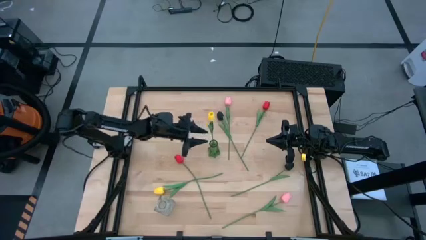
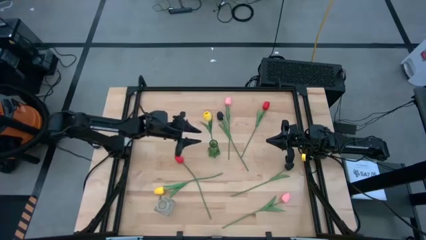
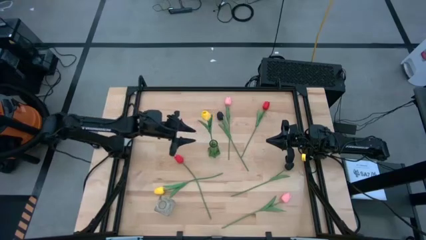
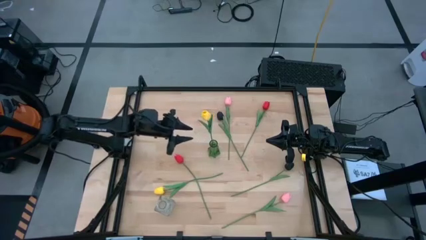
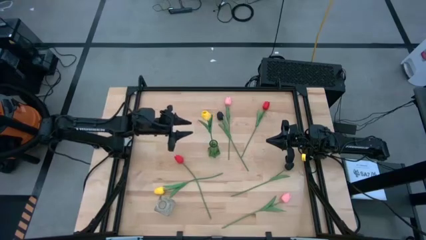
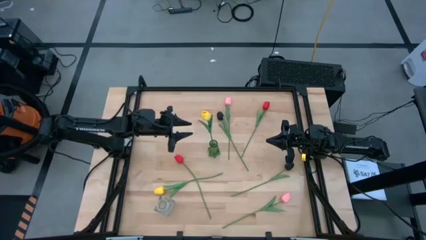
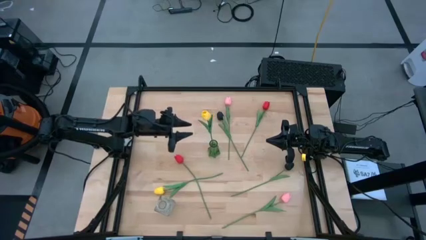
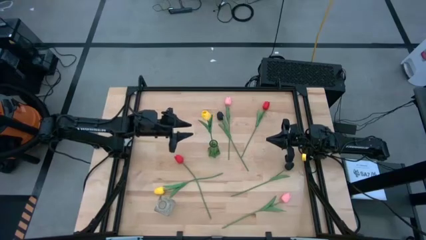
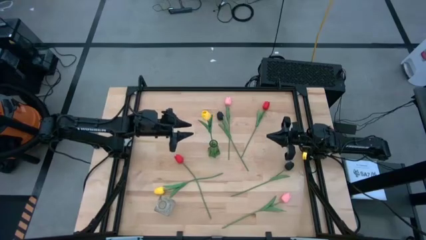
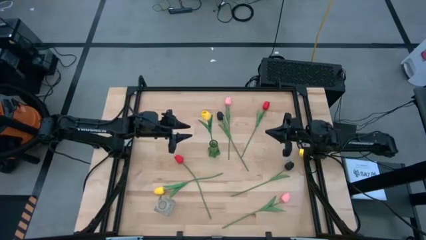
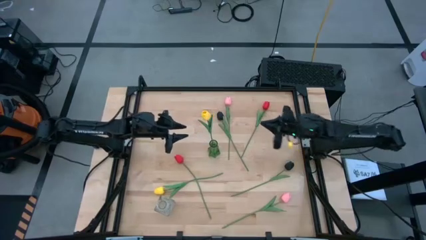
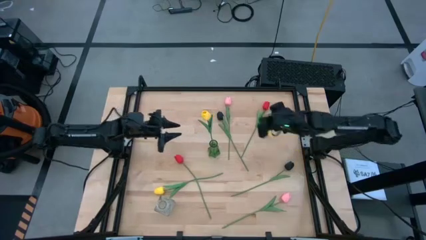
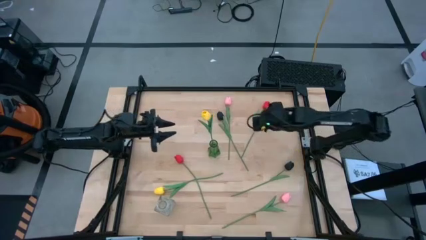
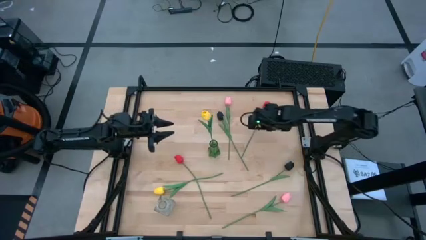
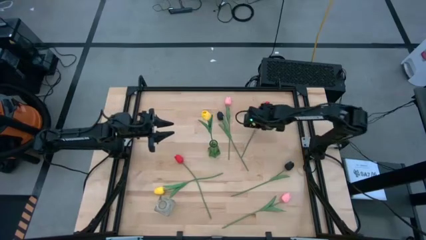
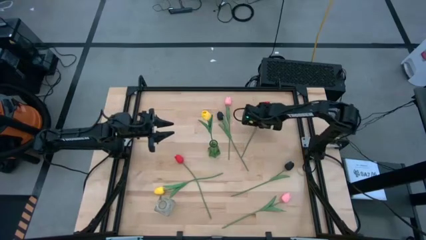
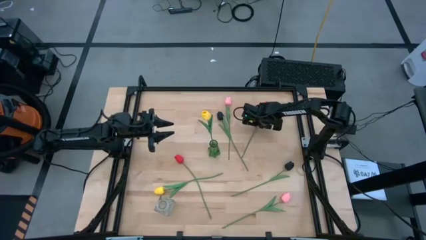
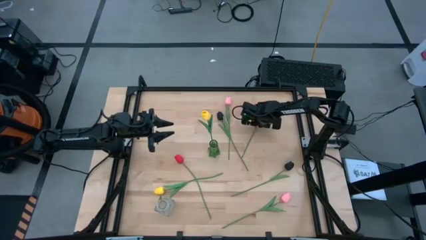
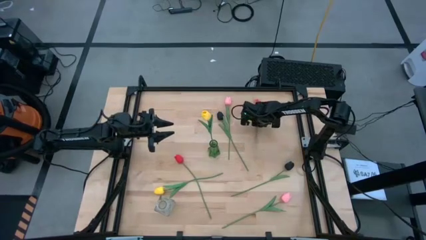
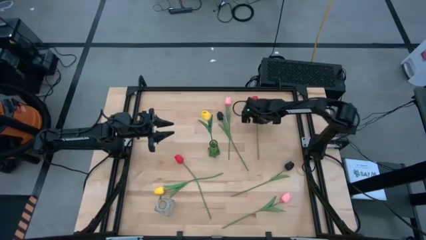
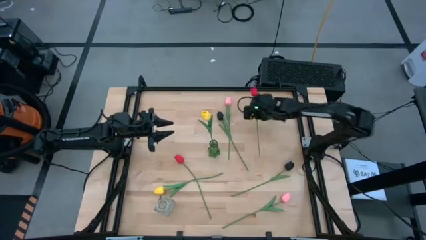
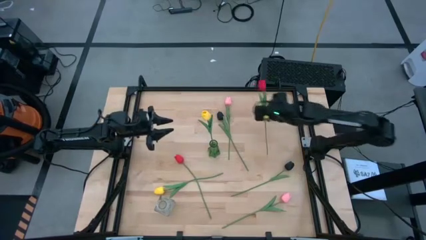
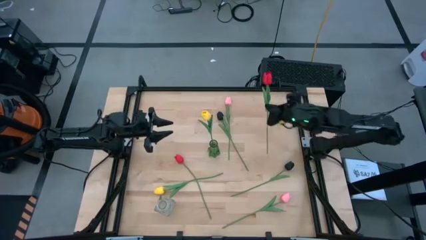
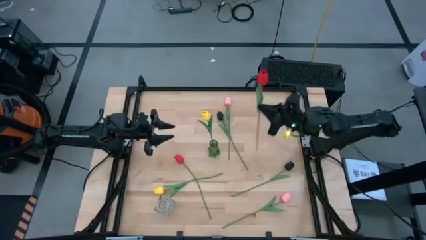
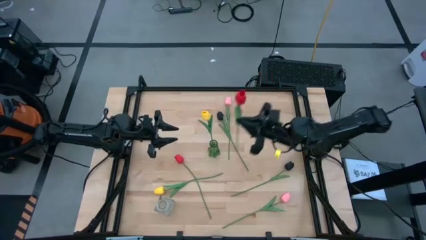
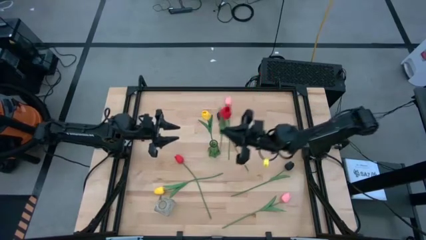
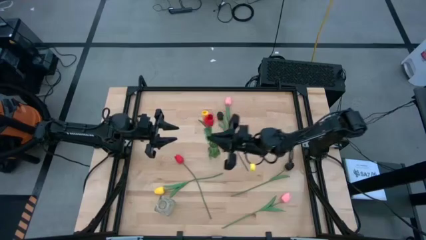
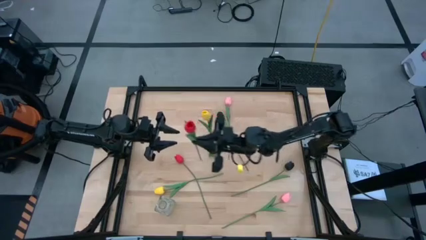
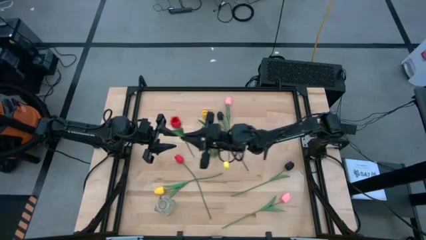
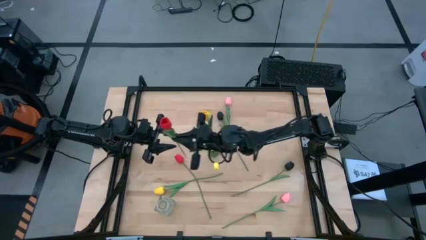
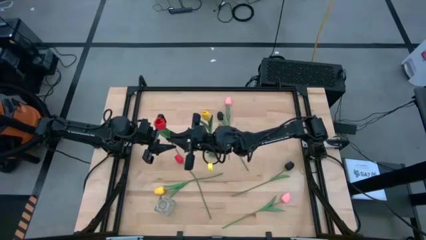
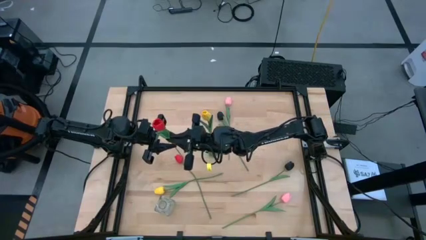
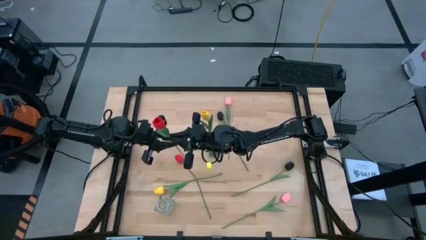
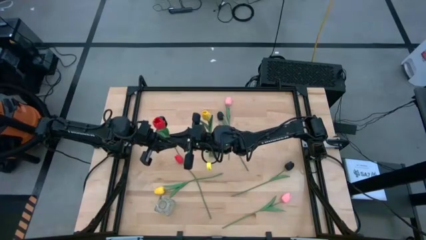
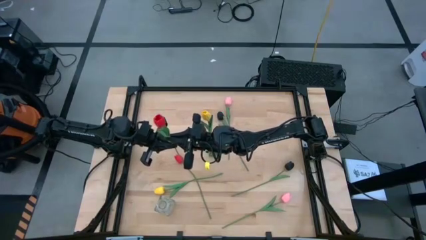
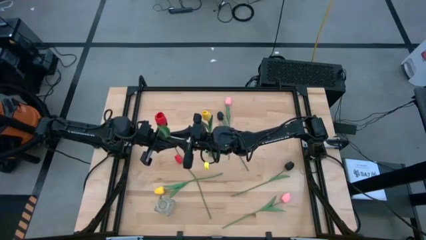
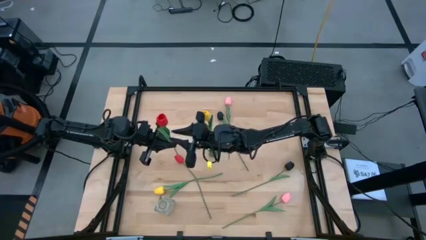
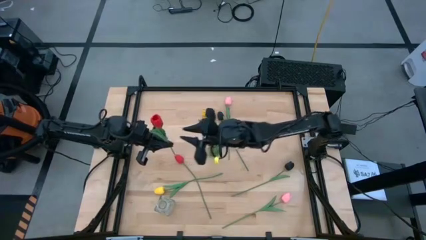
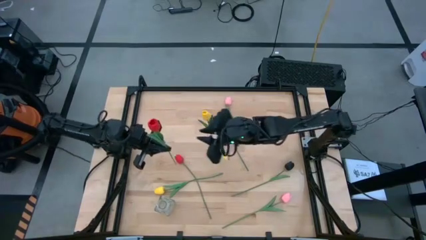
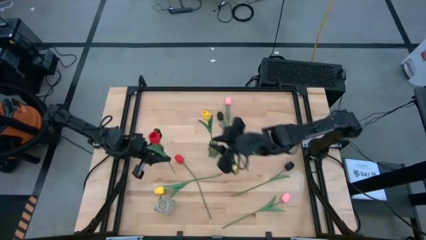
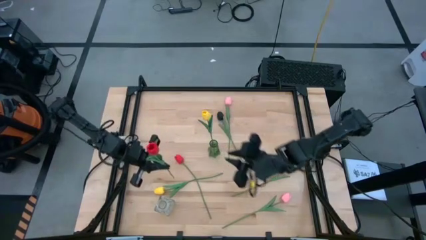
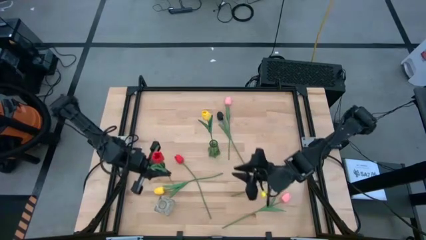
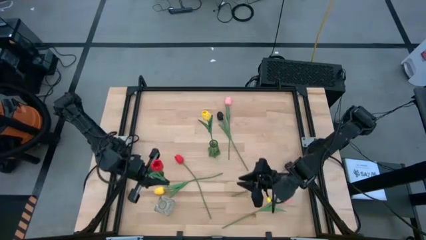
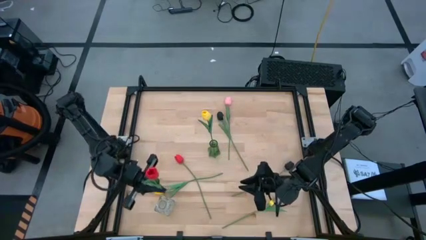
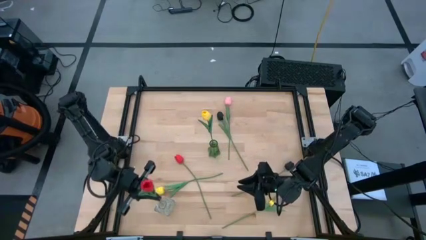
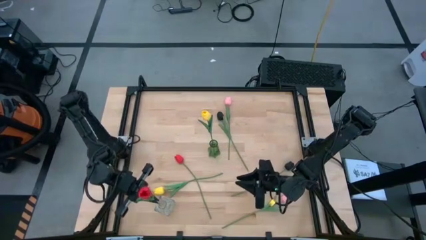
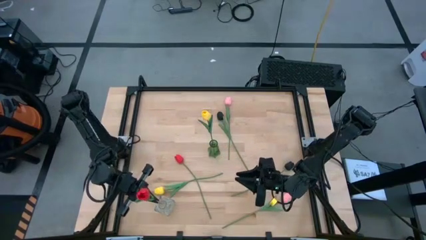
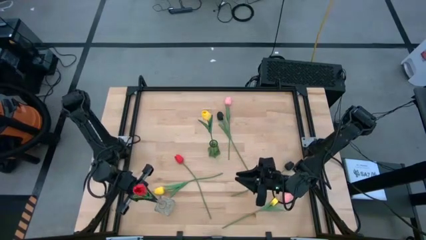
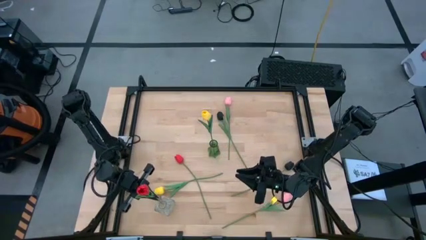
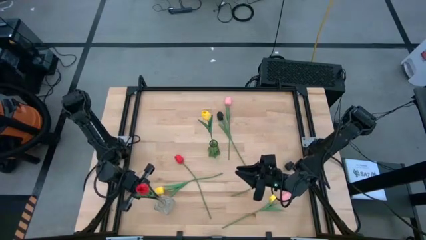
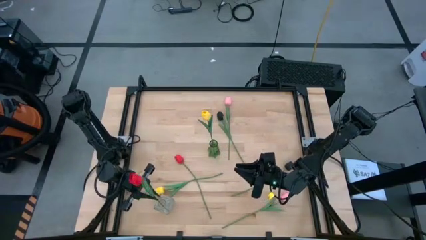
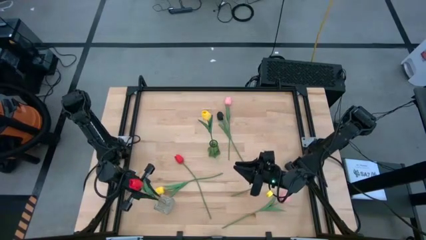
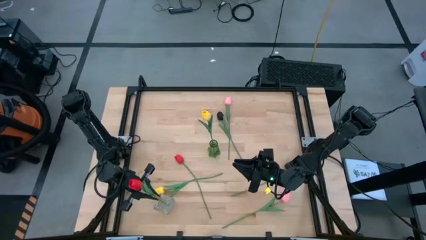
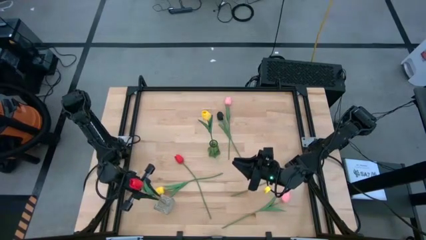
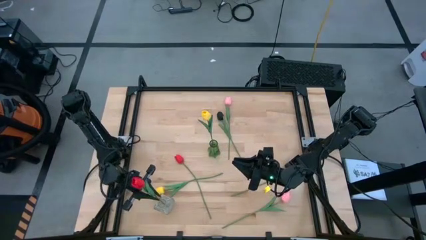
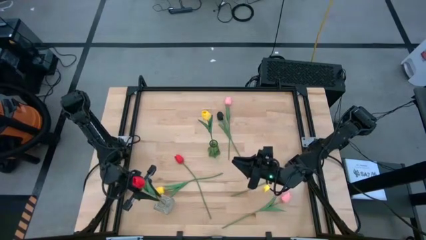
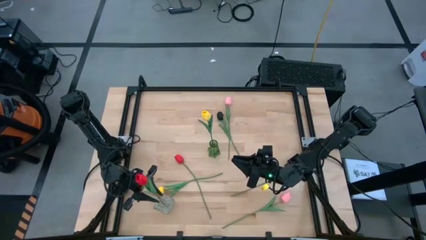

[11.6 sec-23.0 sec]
Task: Sort flowers into vase by color
Put the right red tulip into the transparent vase

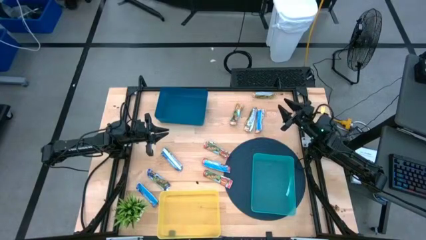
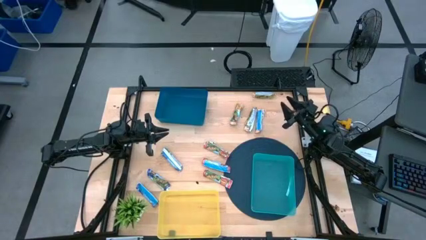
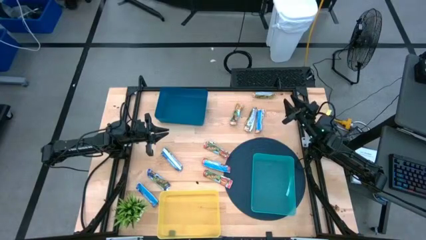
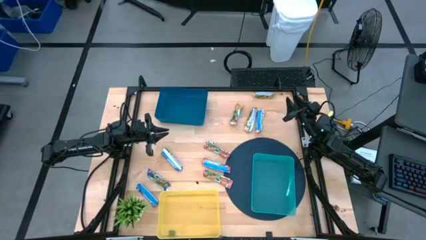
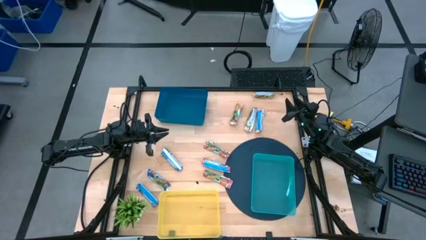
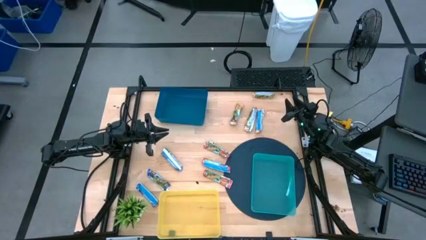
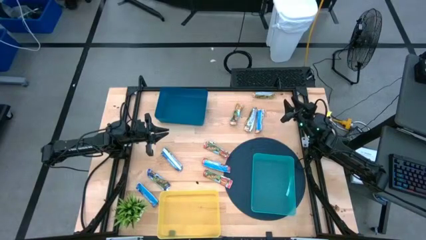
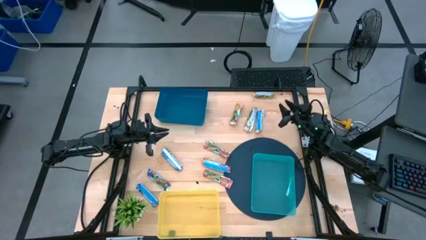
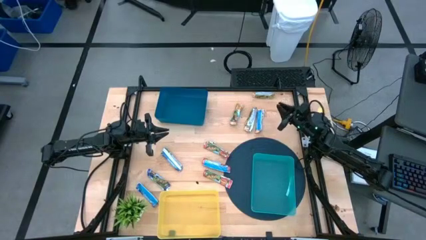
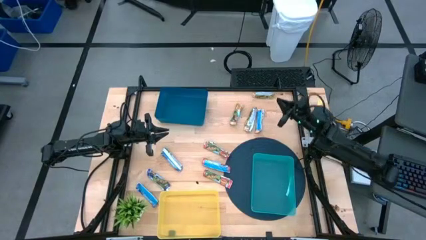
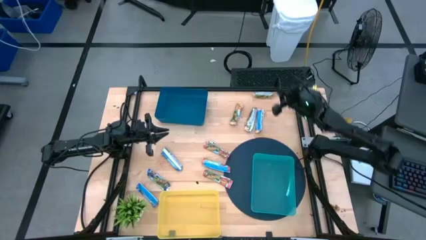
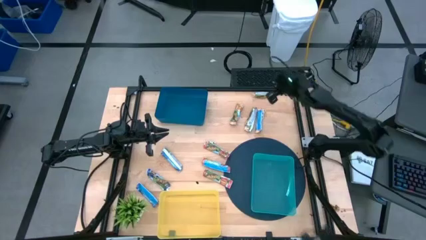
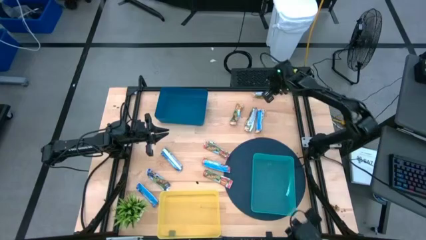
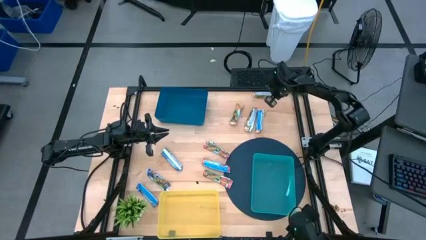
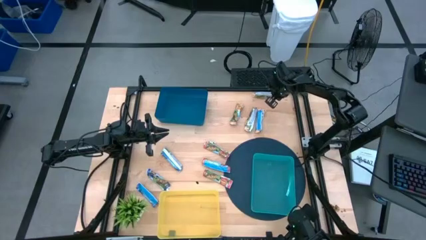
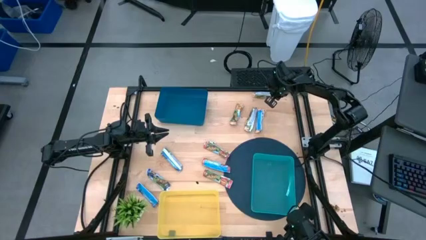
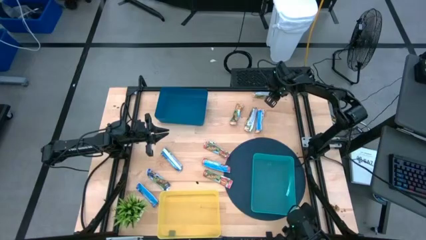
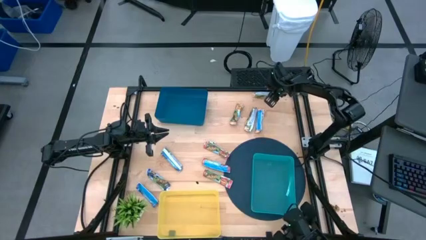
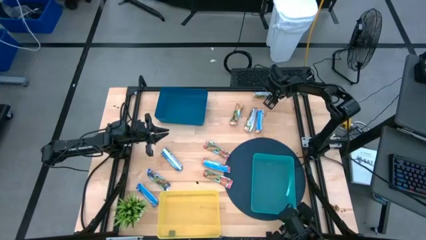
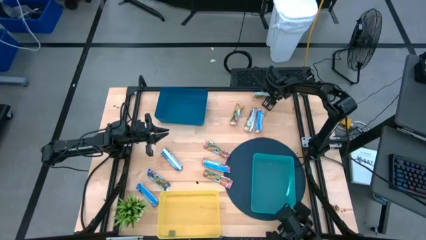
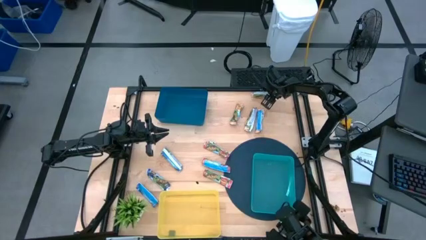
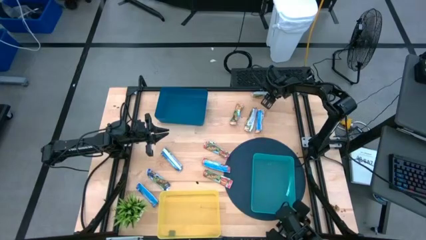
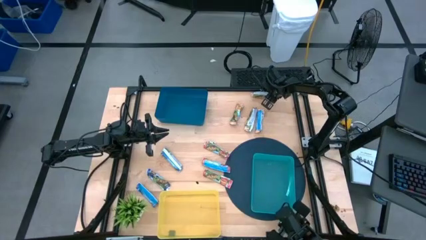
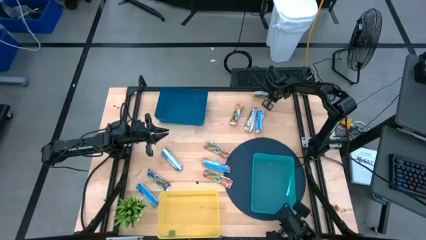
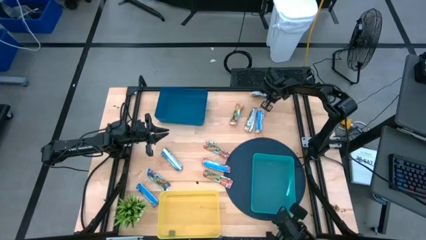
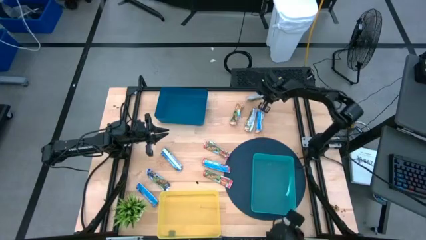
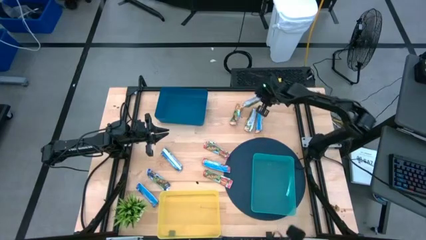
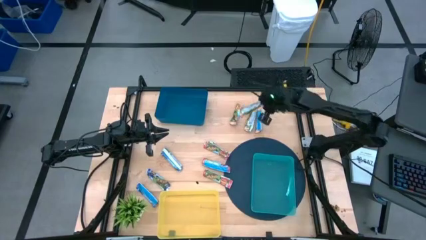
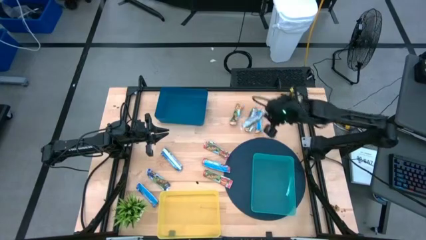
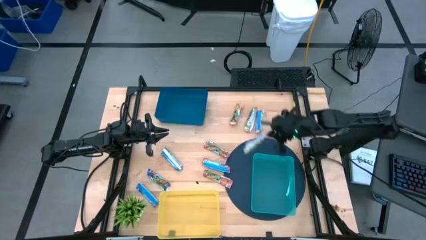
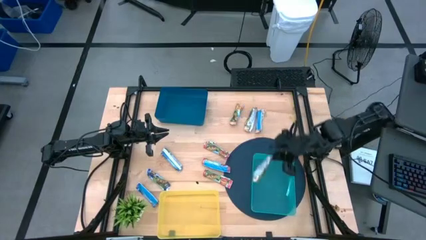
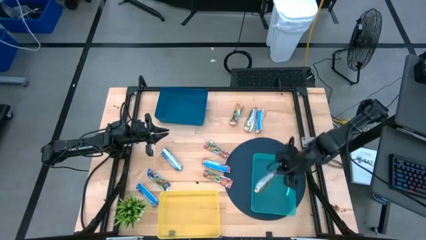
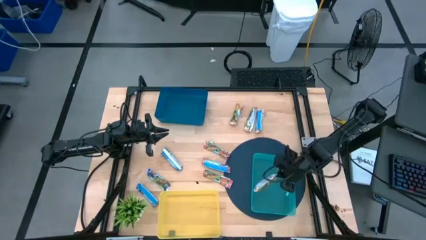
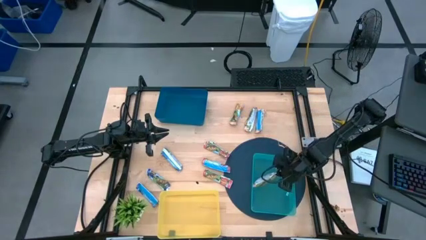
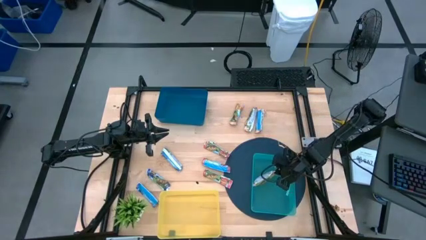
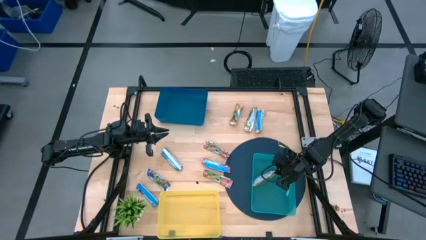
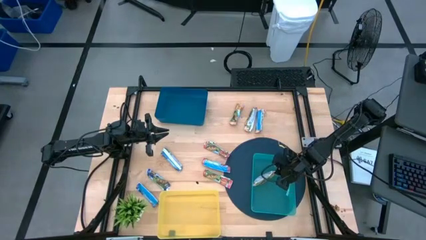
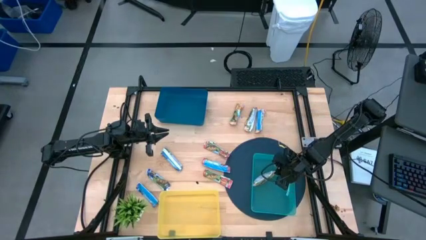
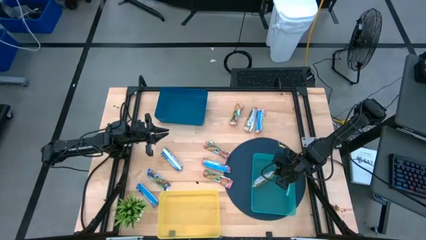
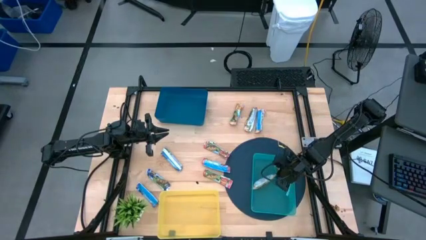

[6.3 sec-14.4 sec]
Task: Pick and place Granola Bars by type
Put the yellow granola bar into the green bin
